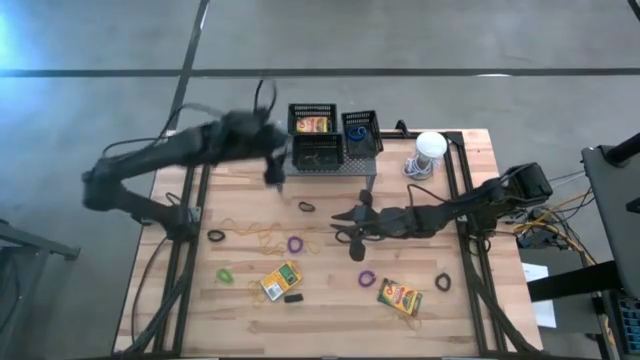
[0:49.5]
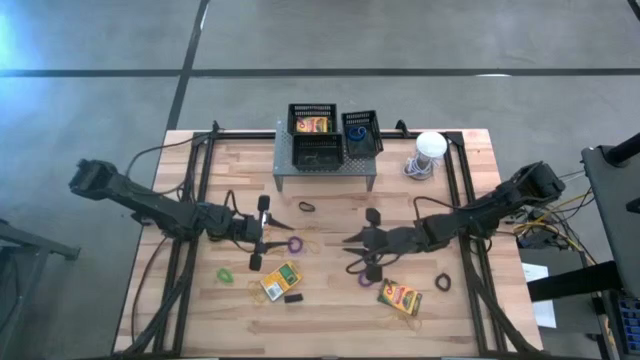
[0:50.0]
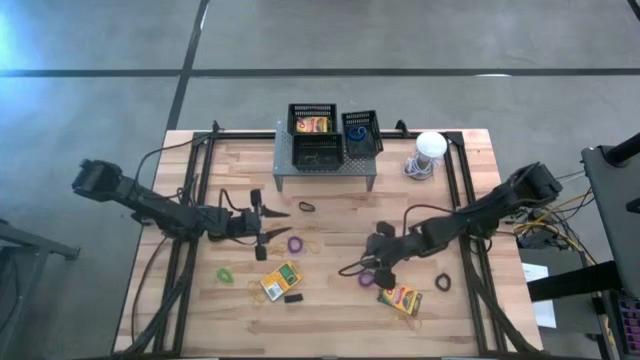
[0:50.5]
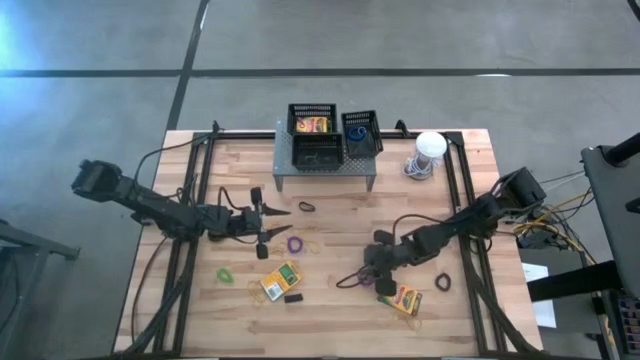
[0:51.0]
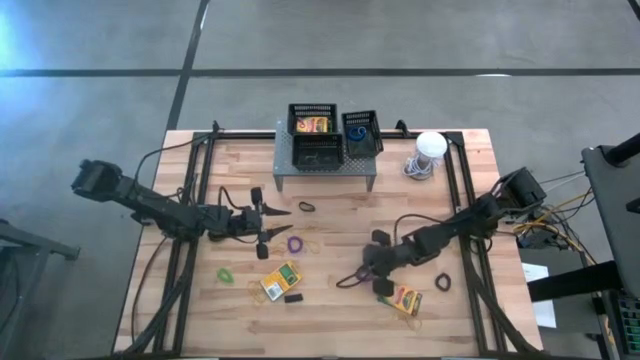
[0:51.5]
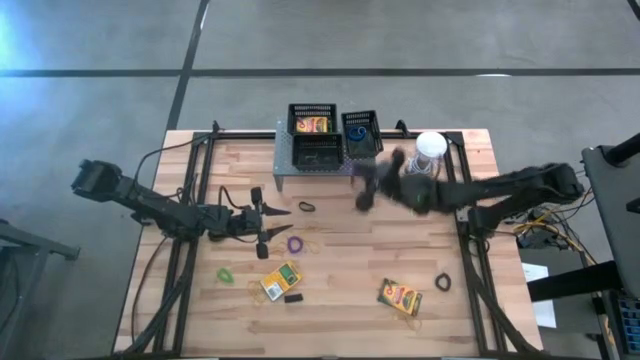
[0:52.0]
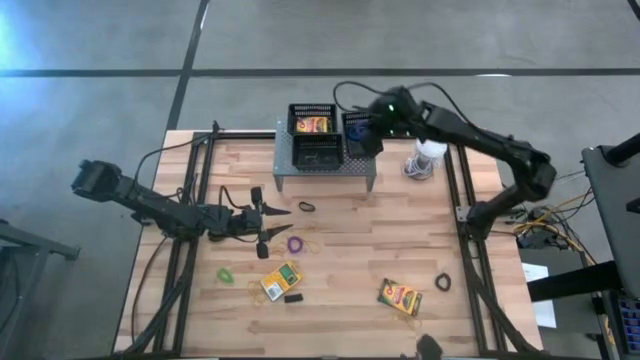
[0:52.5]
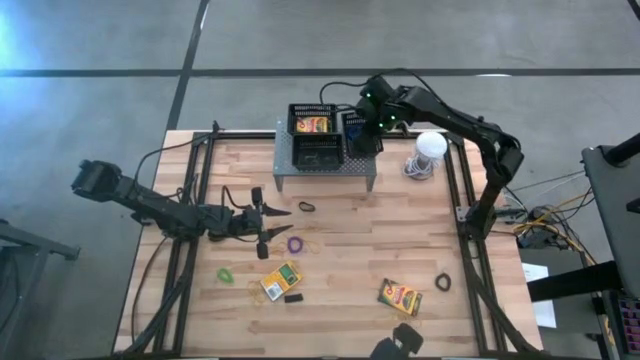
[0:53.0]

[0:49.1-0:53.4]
Task: Pick & Place Office Desk Supplies
Put the violet spring keychain into the right black bin

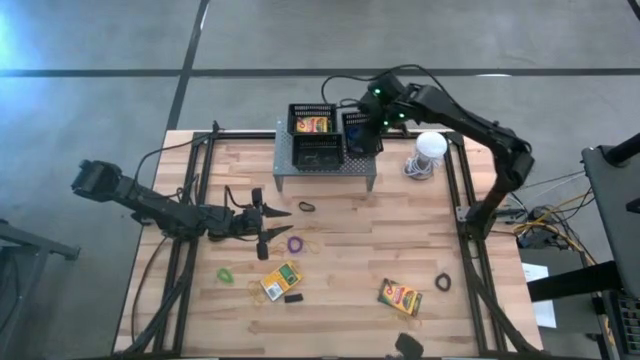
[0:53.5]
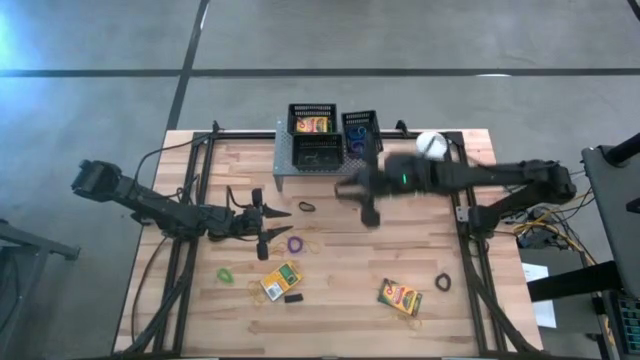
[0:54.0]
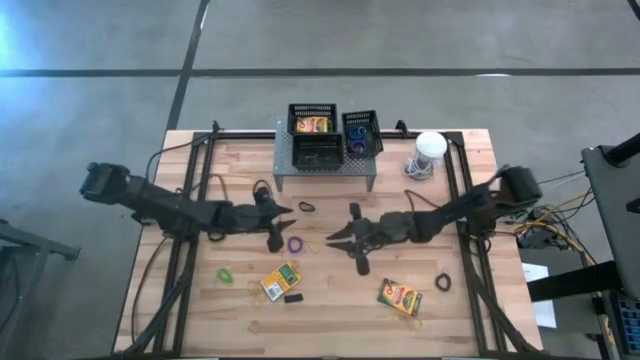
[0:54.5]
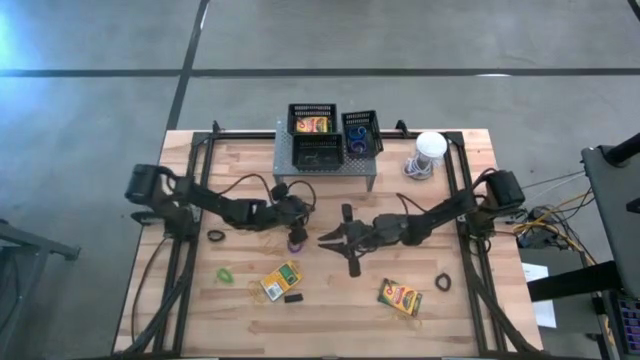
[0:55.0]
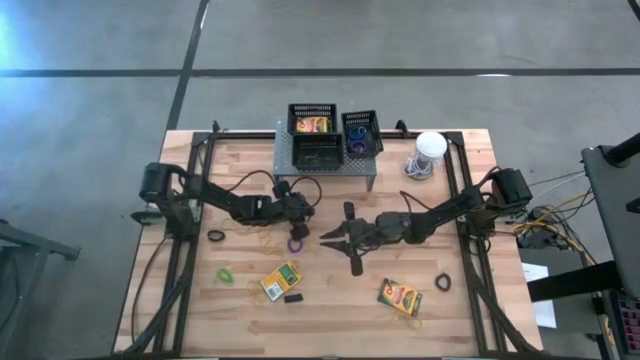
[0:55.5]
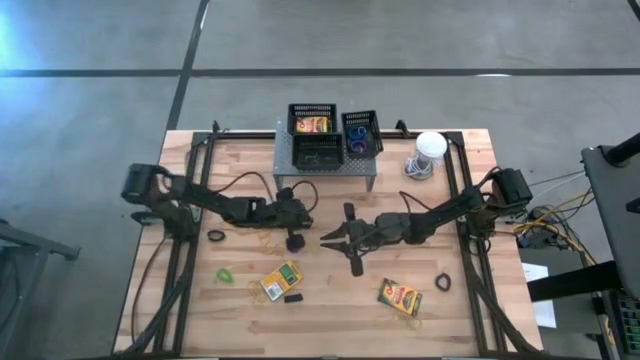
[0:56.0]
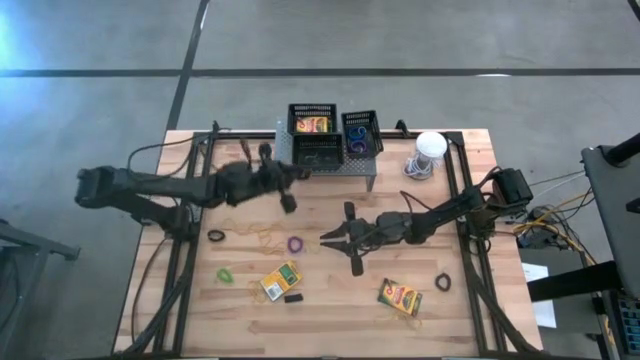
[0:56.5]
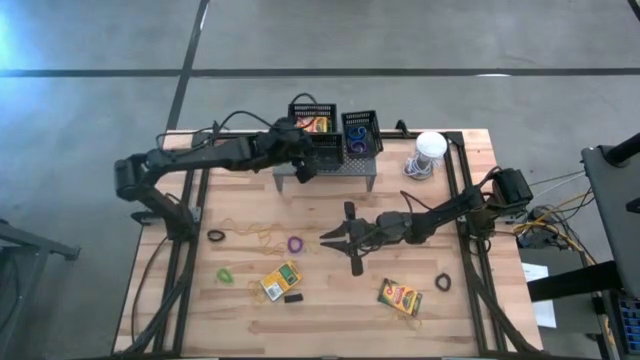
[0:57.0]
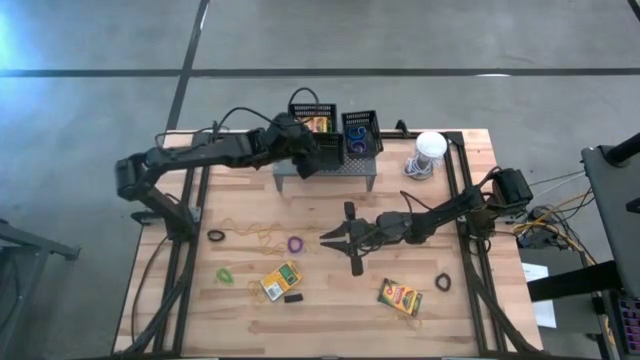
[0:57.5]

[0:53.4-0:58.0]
Put the black rubber band into the bottom left black bin

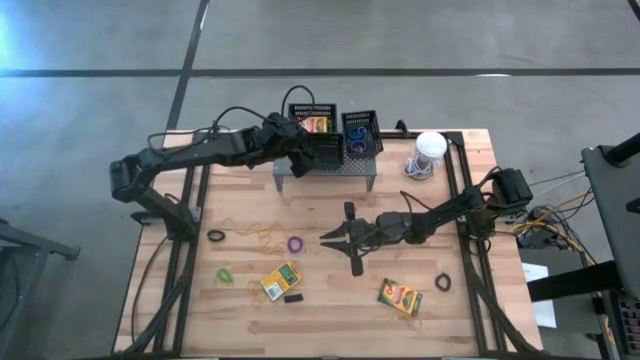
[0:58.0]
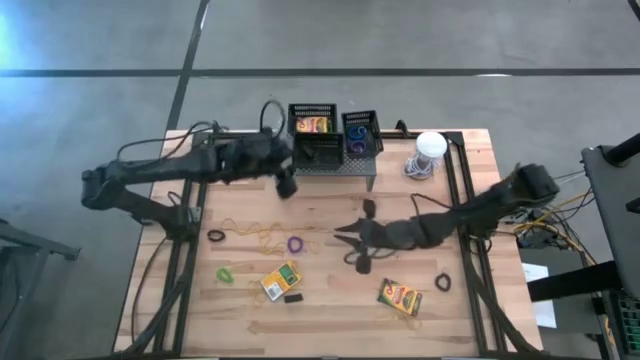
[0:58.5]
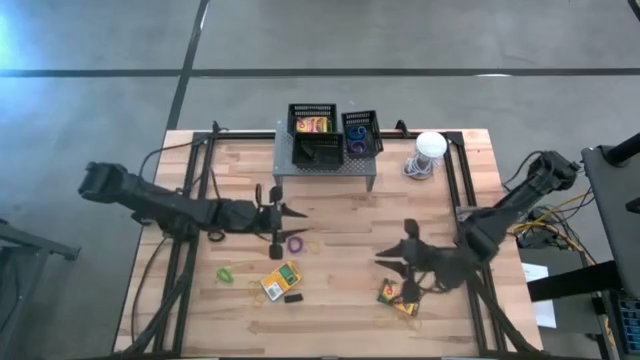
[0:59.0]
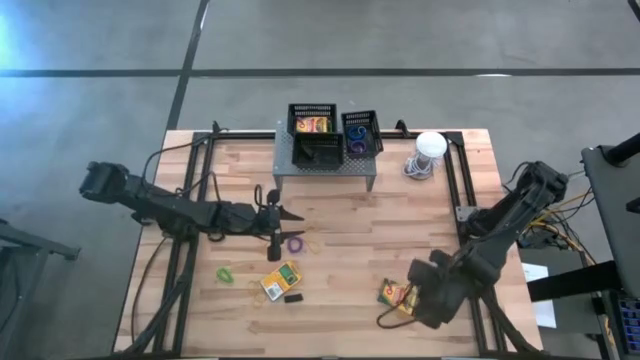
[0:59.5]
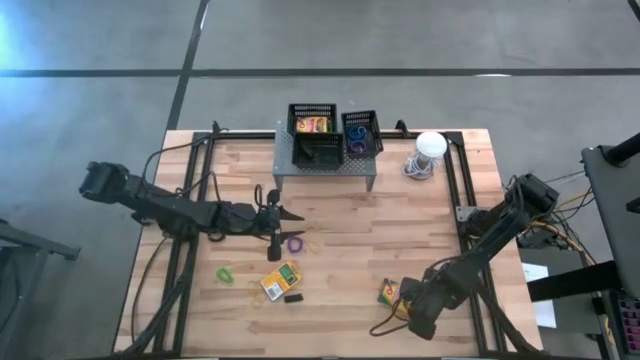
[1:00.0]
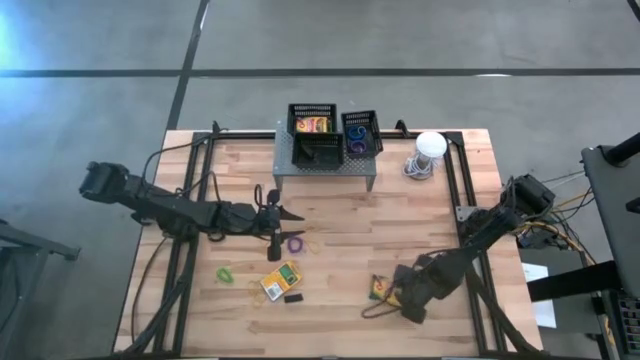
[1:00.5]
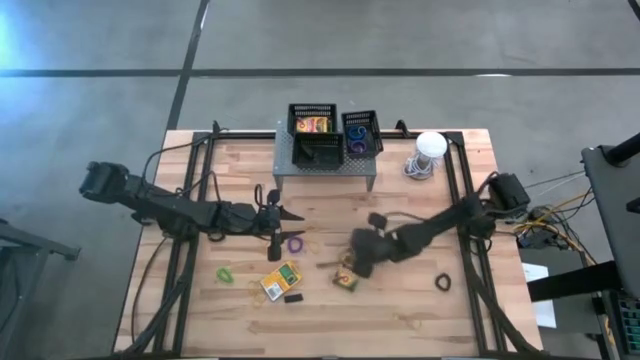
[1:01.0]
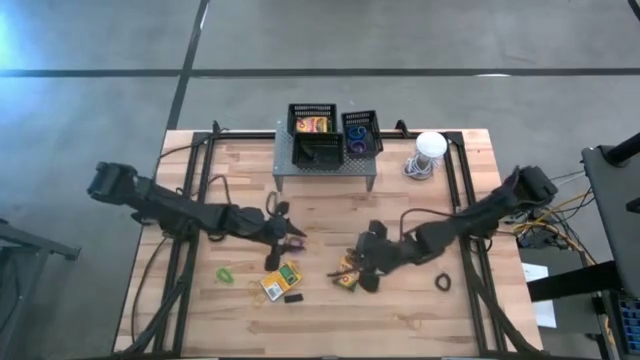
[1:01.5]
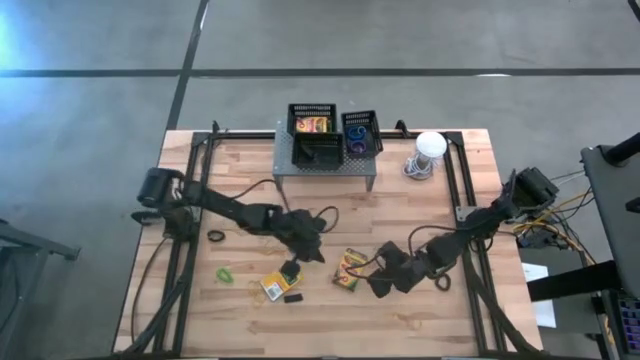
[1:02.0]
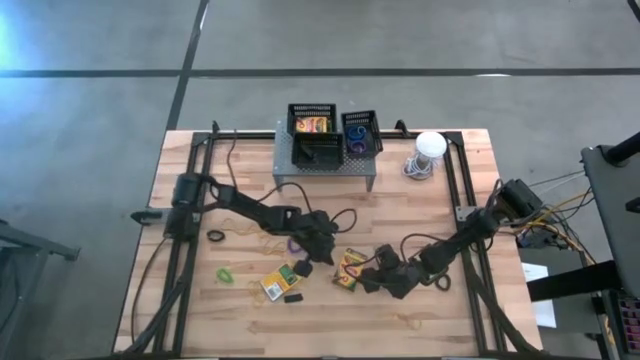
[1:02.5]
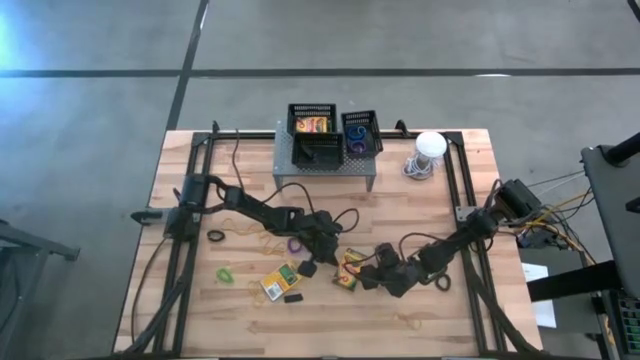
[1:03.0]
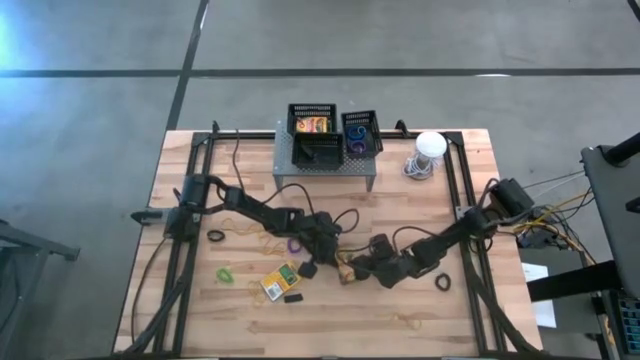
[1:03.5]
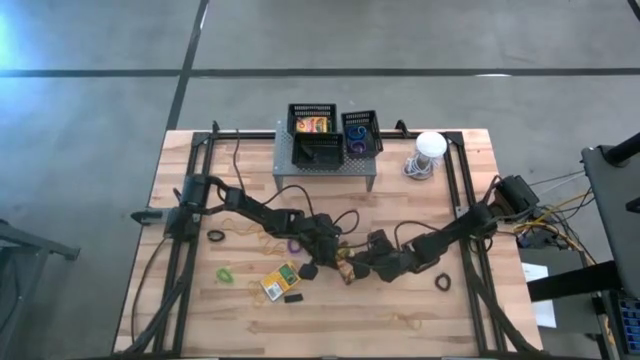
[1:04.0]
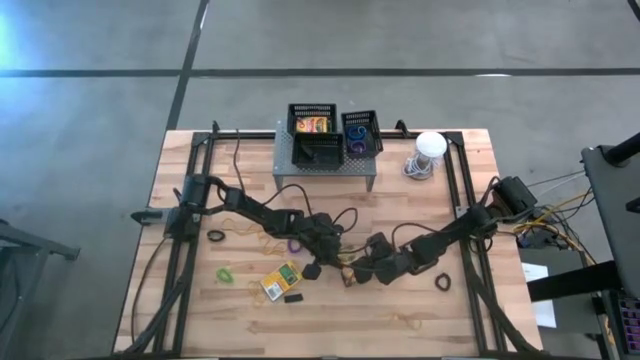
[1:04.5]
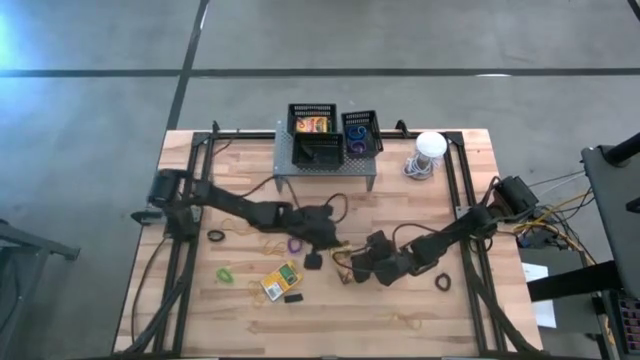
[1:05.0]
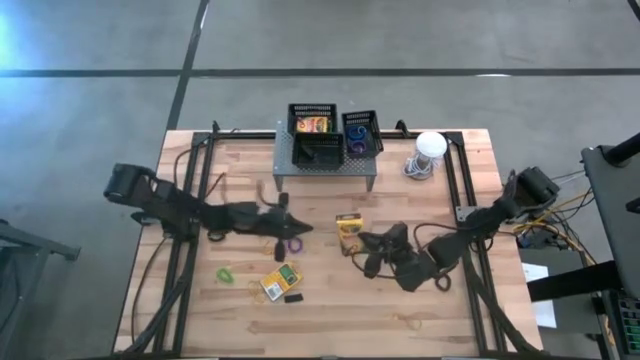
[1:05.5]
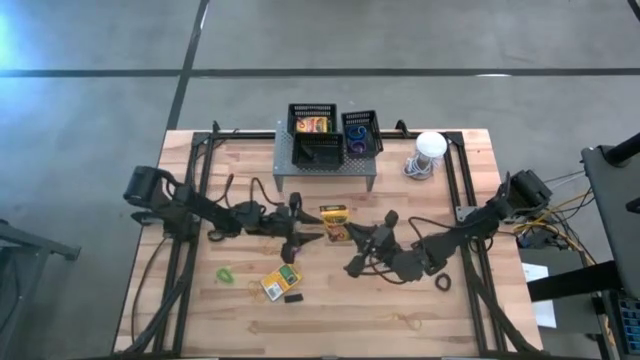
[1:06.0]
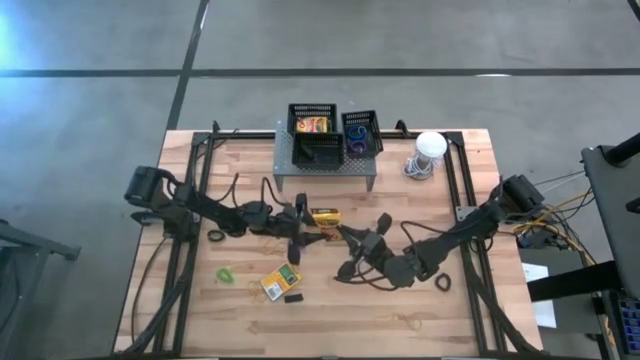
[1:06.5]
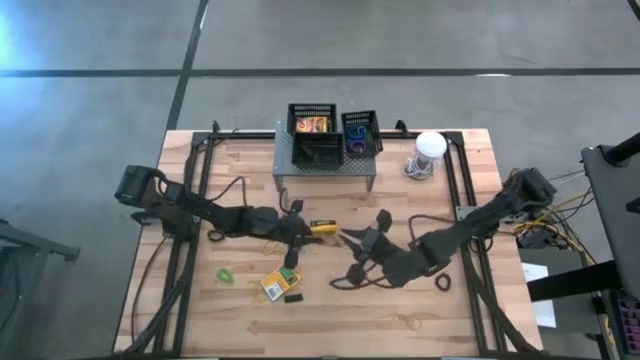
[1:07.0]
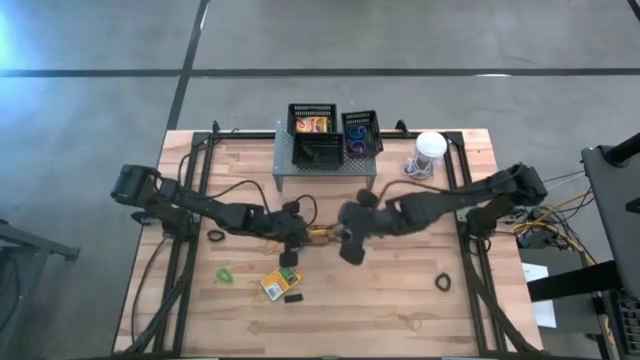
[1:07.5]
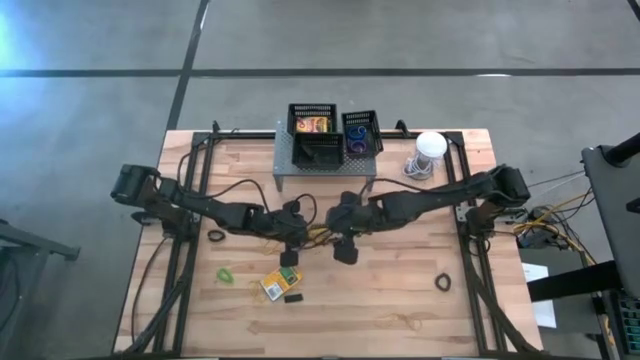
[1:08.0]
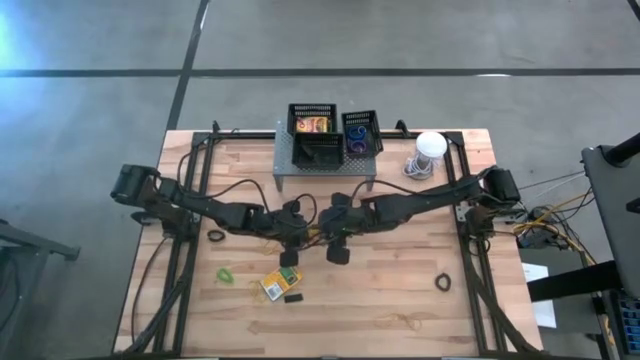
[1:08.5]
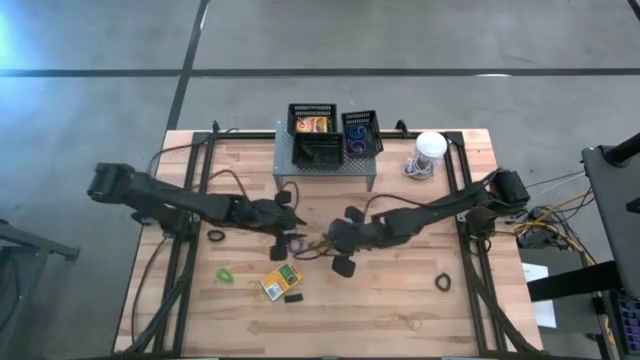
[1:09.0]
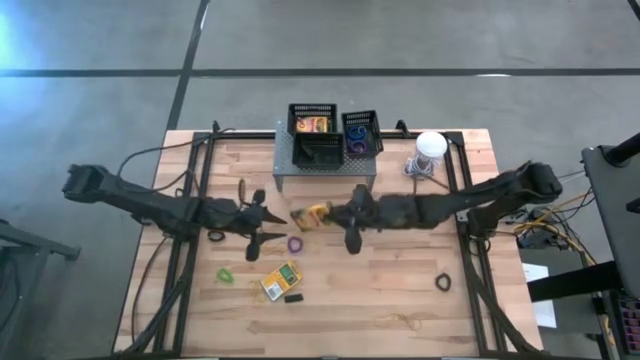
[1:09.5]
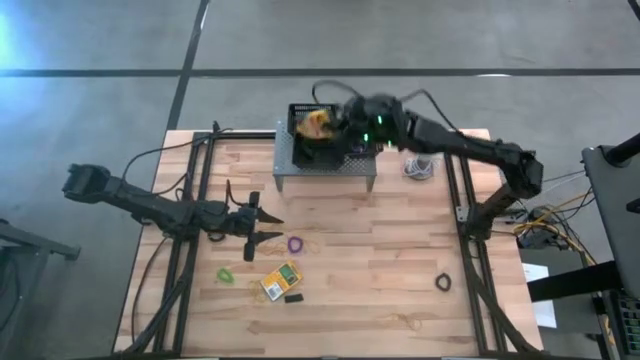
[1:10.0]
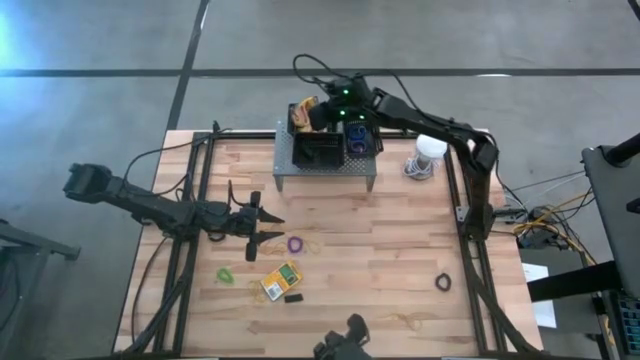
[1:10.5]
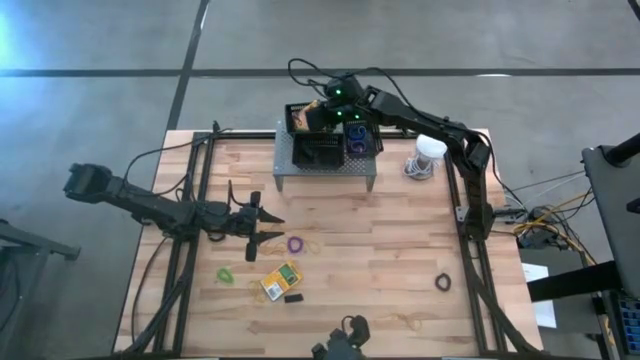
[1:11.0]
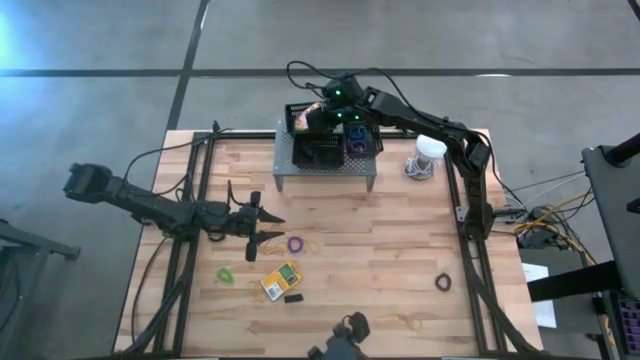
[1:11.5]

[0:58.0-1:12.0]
Put the crayon box in the top left black bin
